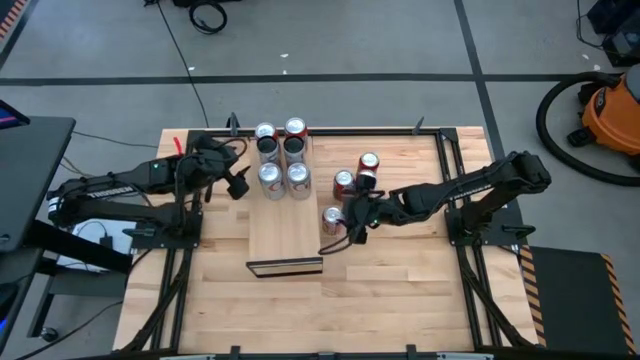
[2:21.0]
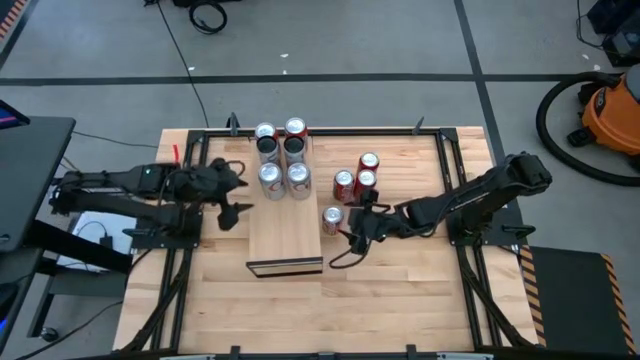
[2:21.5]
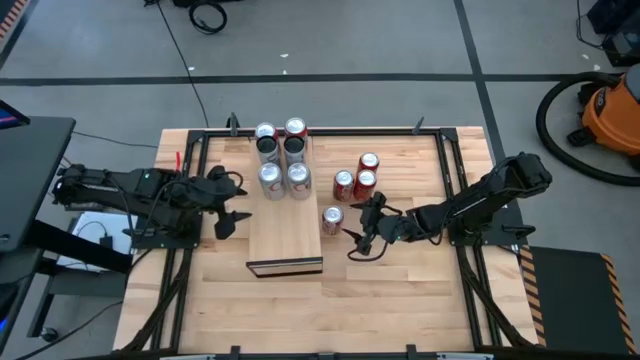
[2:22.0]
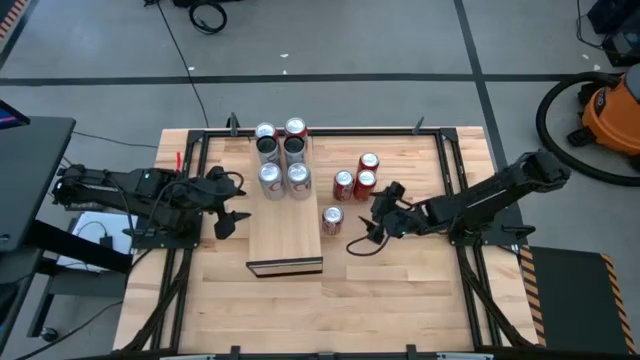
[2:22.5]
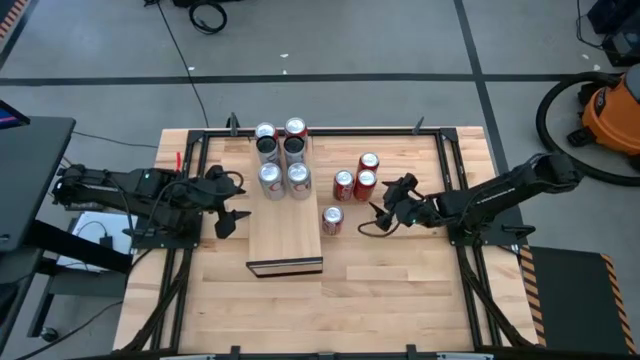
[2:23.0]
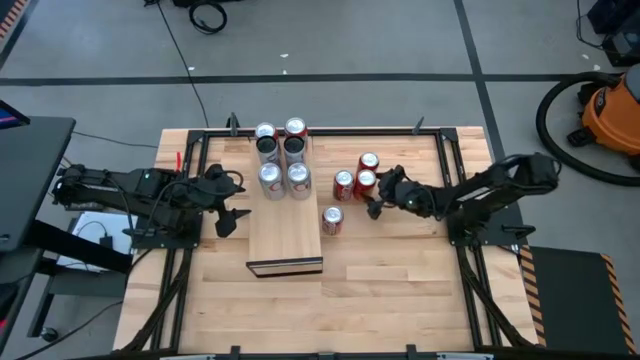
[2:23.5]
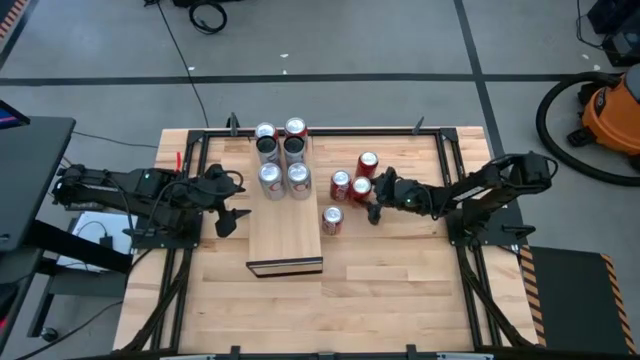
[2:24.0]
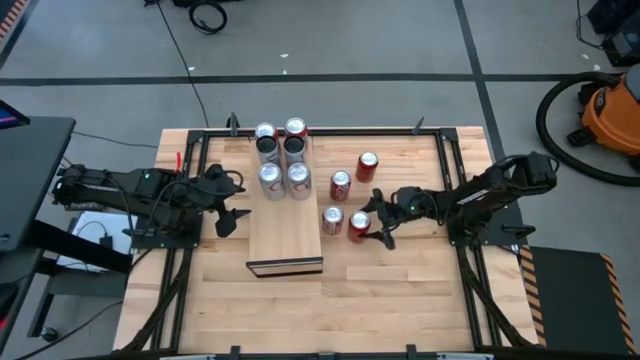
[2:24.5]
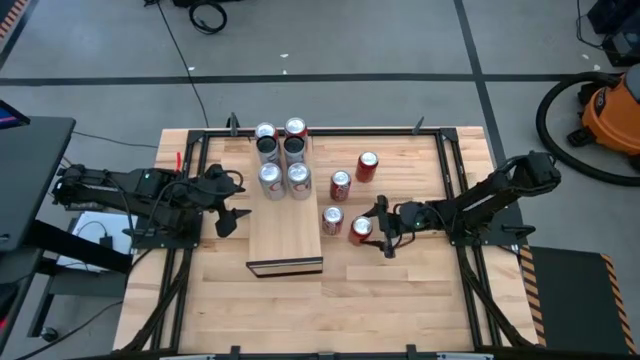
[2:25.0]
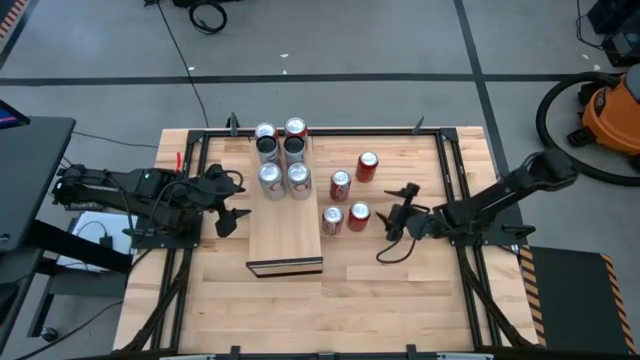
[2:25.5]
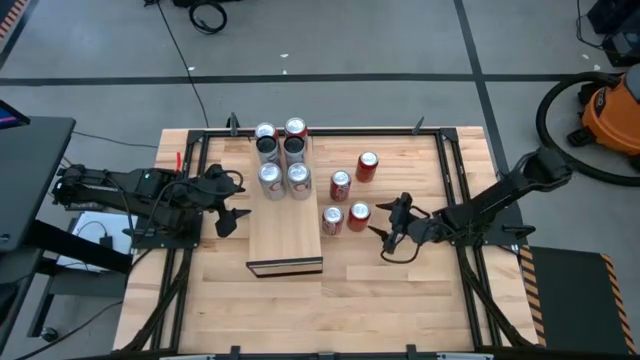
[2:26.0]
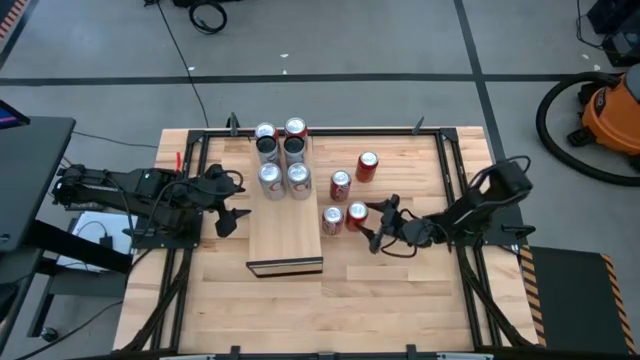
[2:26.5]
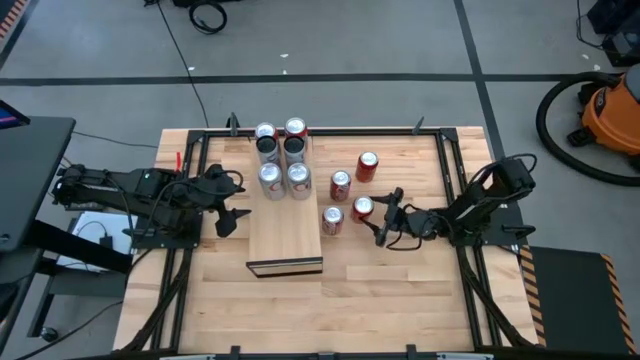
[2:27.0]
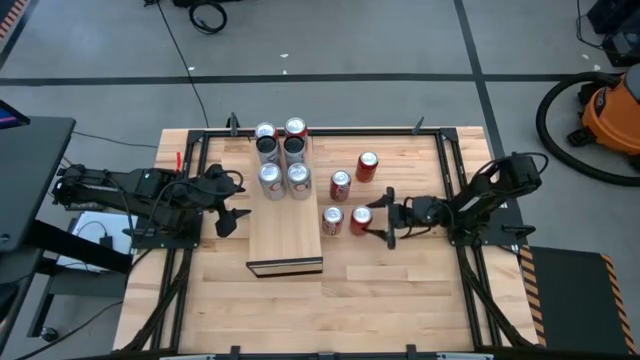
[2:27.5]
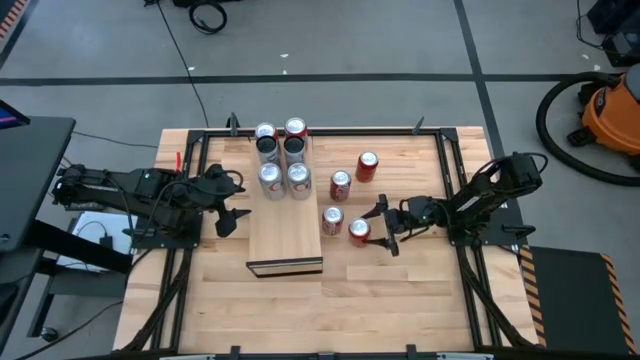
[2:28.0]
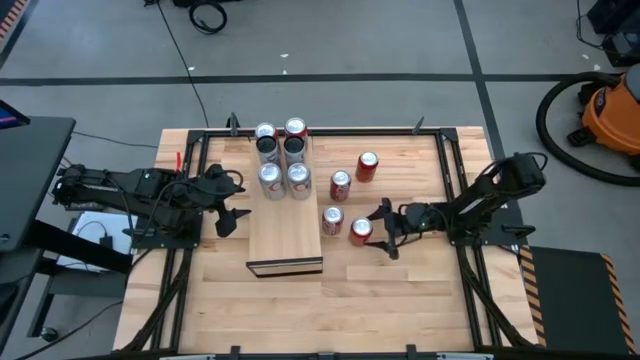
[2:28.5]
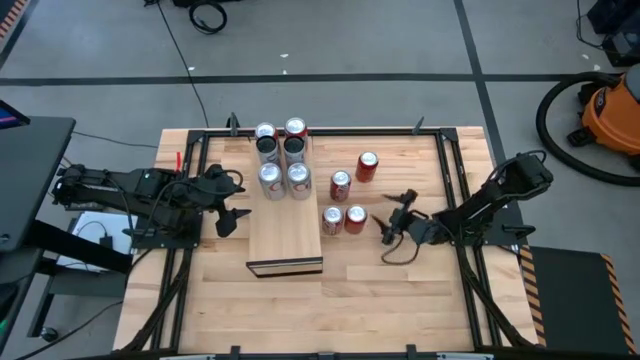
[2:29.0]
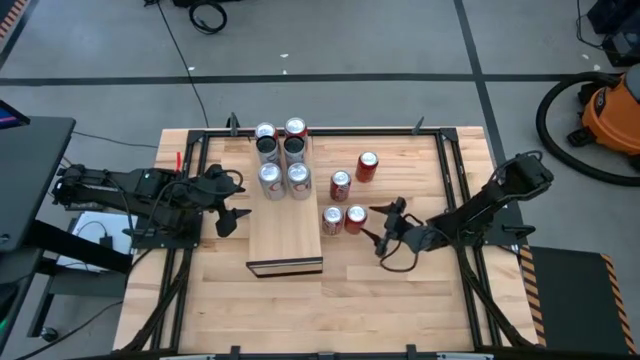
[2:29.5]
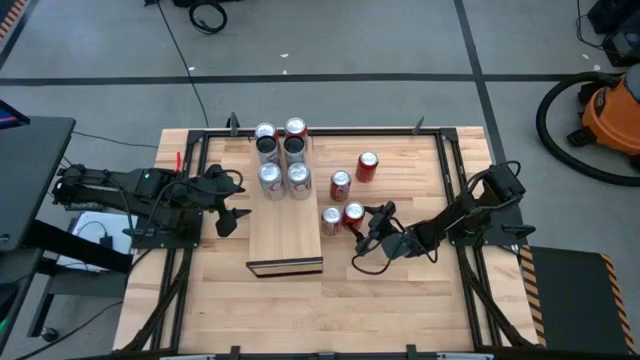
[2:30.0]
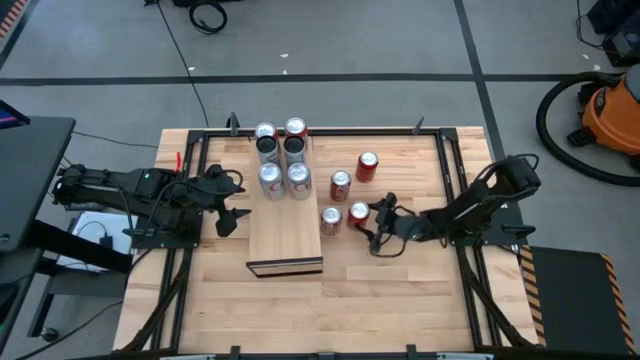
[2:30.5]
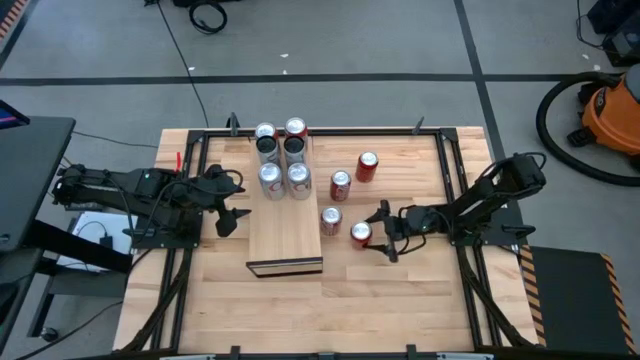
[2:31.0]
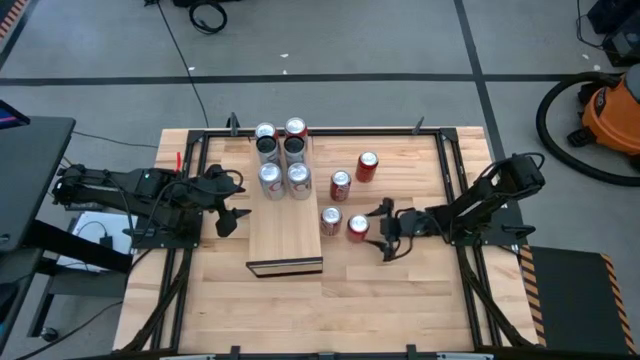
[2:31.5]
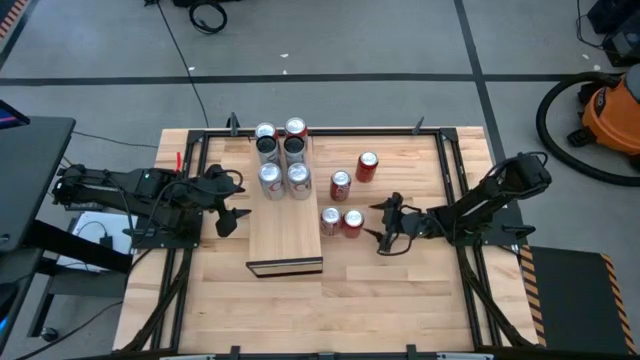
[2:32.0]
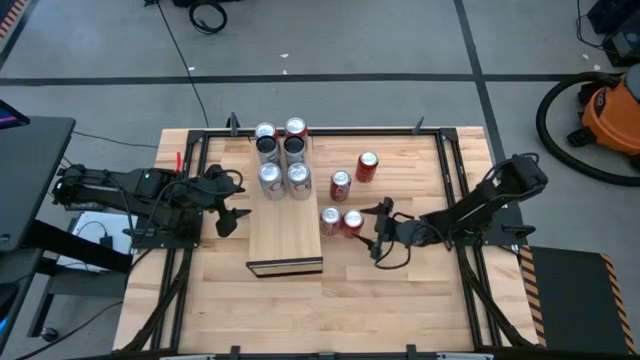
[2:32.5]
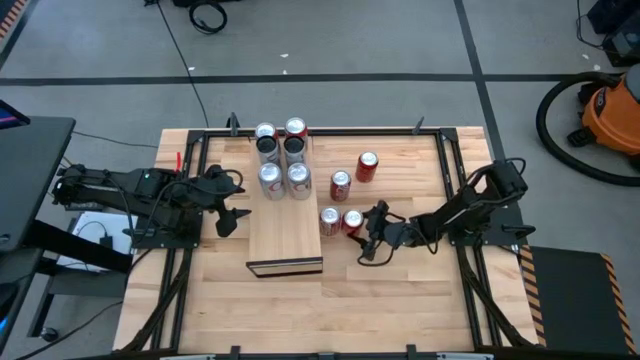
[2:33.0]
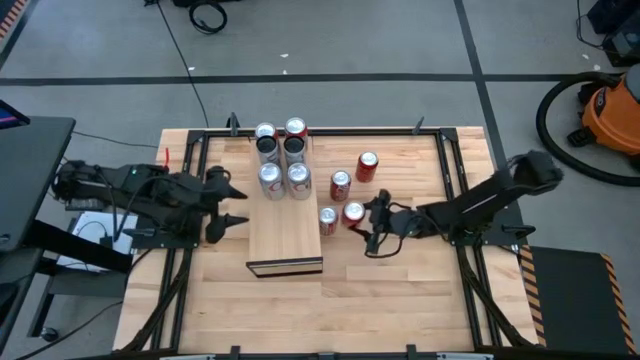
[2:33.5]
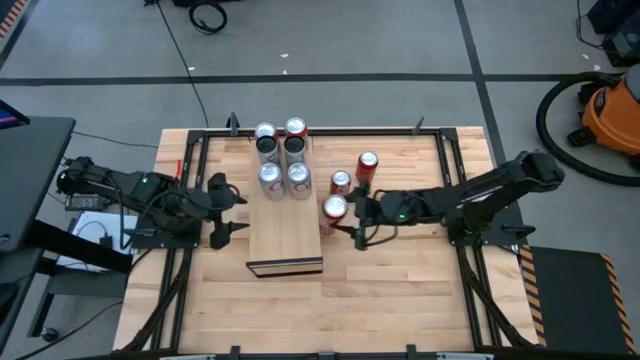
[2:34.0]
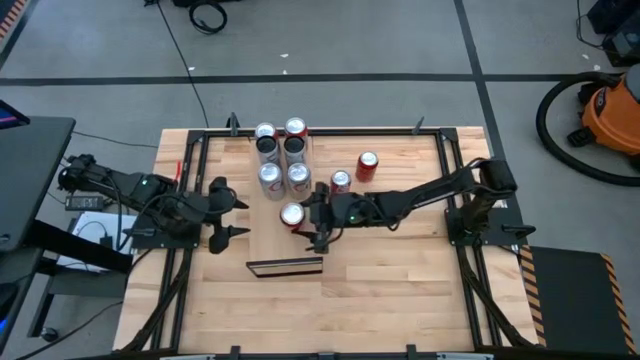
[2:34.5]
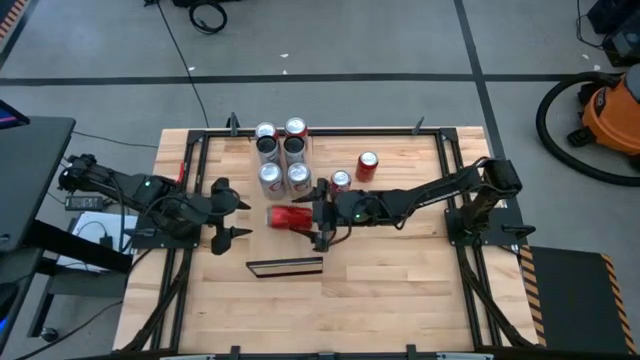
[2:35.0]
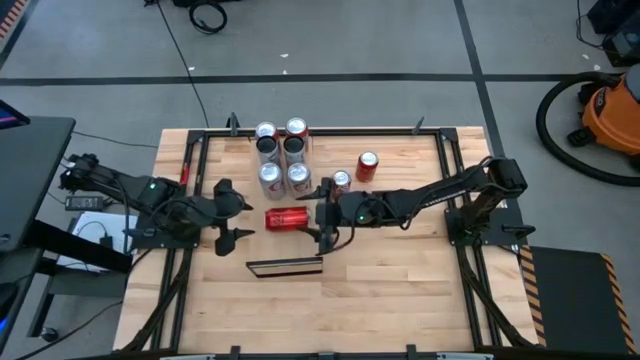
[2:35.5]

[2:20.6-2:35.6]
Task: Place canned beverage on shelf
Put the red-black soda can on the shelf

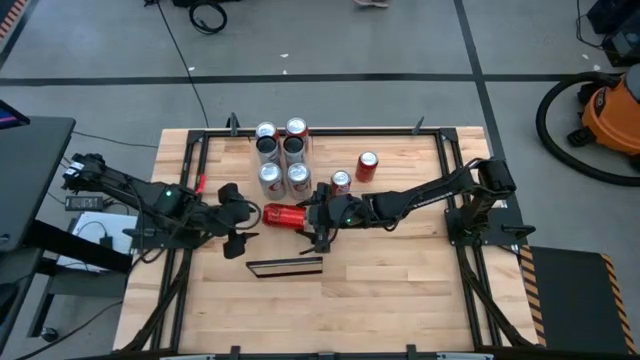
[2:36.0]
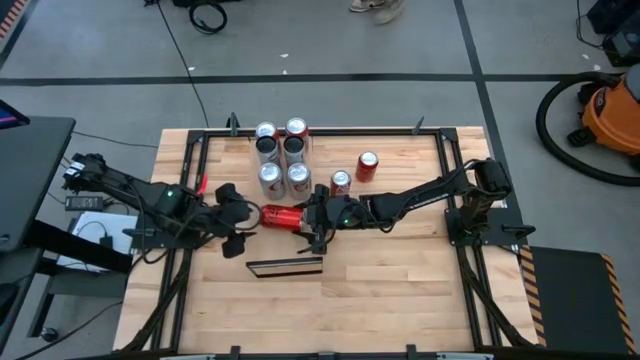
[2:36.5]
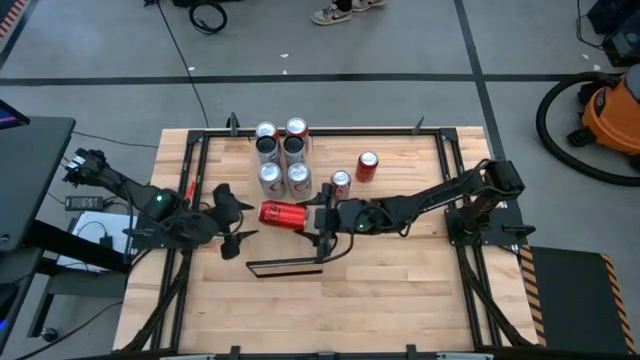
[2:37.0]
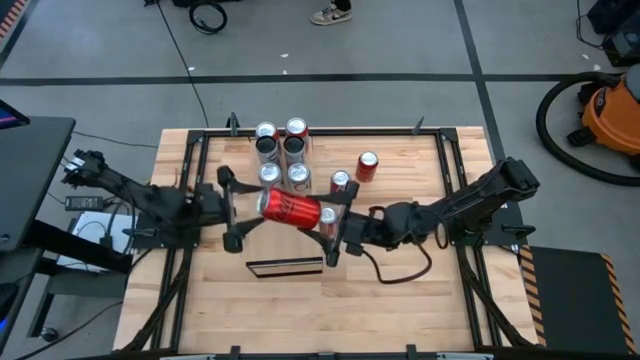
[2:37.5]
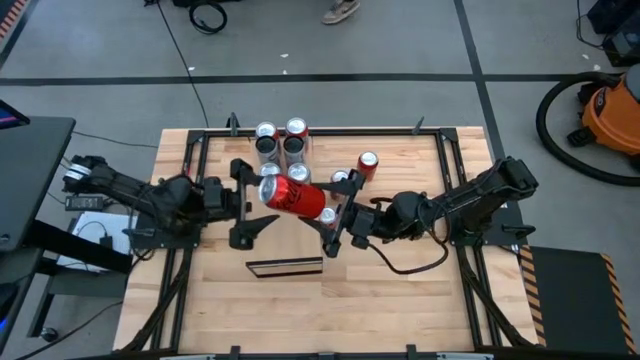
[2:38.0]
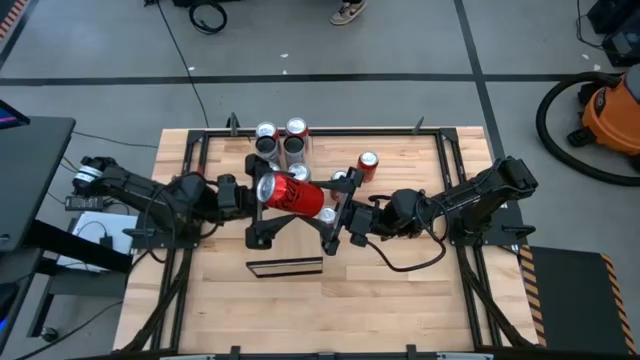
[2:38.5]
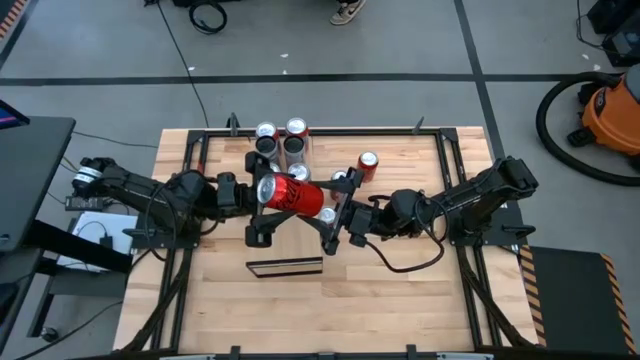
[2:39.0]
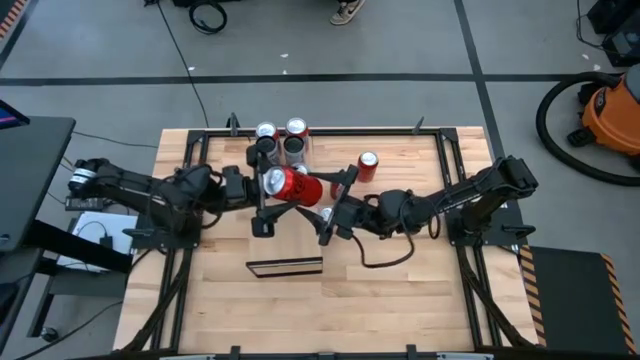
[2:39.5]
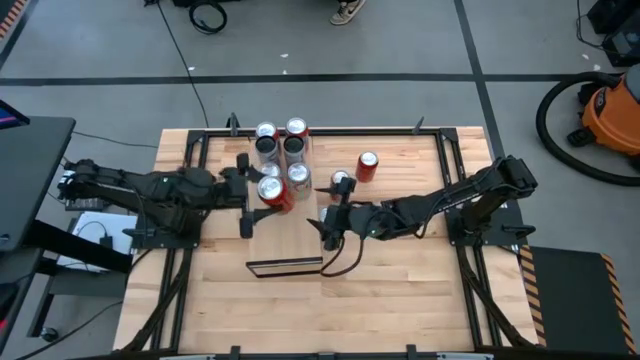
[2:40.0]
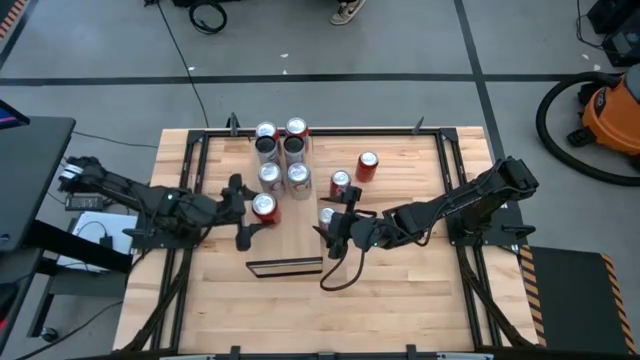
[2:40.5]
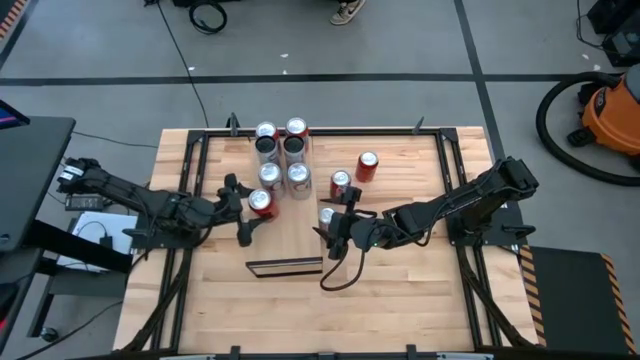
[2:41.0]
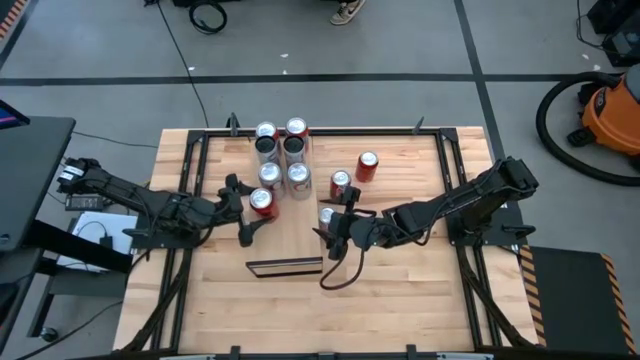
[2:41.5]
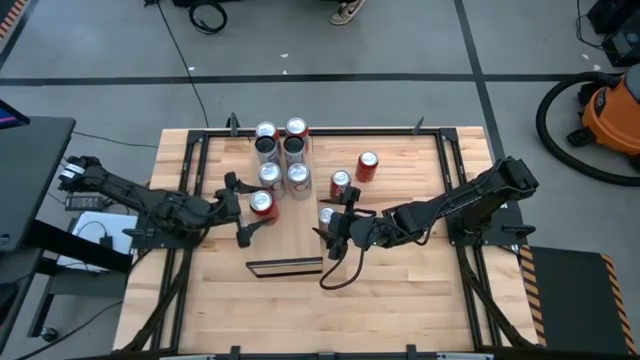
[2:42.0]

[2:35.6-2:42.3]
Put the red-black soda can on the shelf
